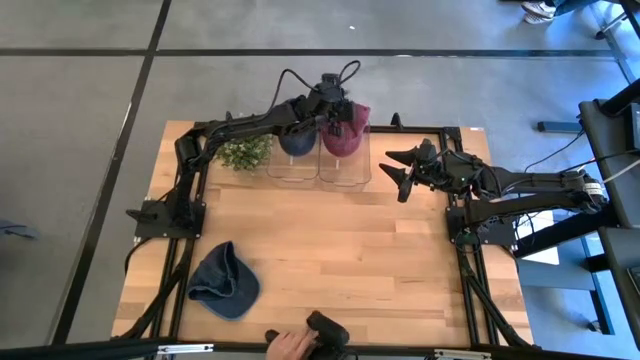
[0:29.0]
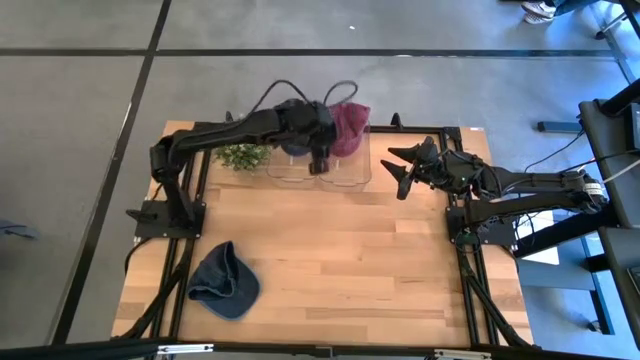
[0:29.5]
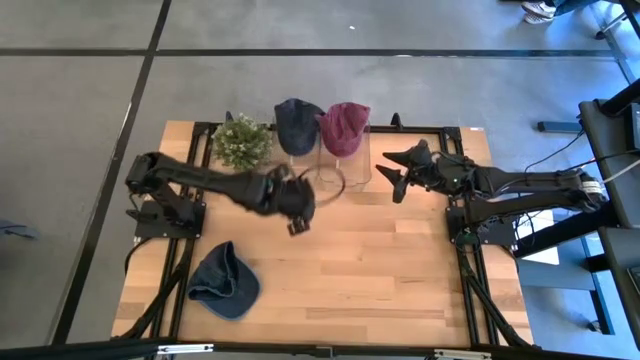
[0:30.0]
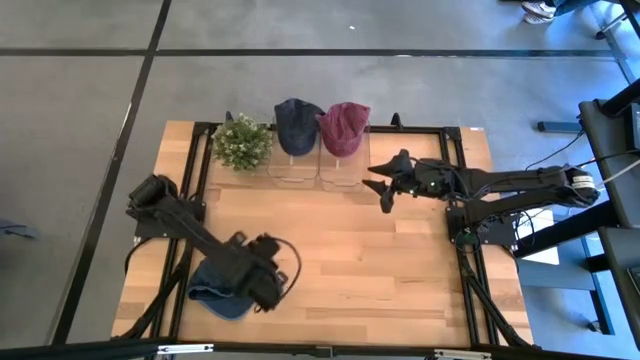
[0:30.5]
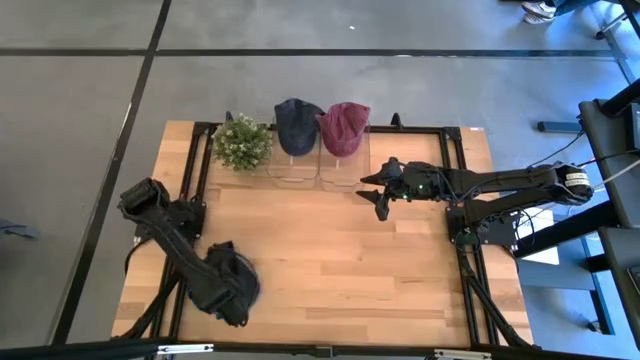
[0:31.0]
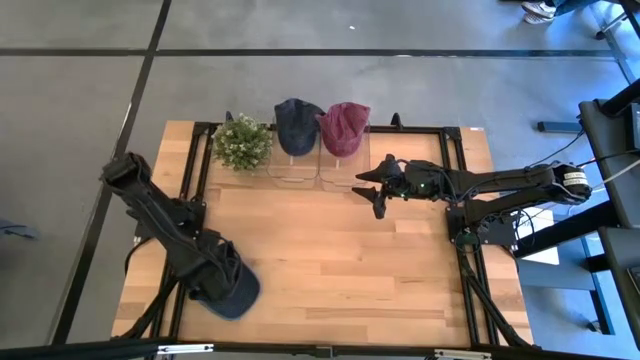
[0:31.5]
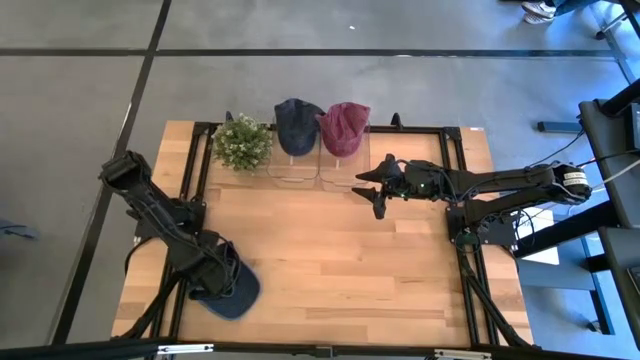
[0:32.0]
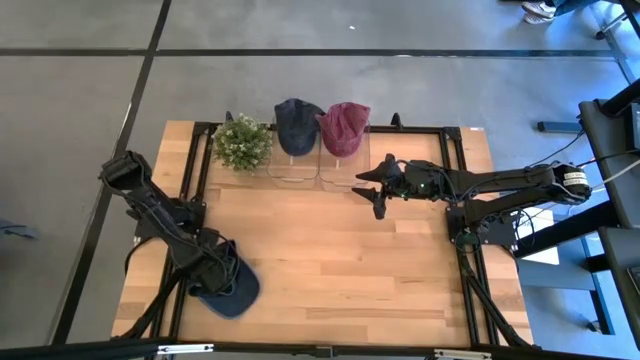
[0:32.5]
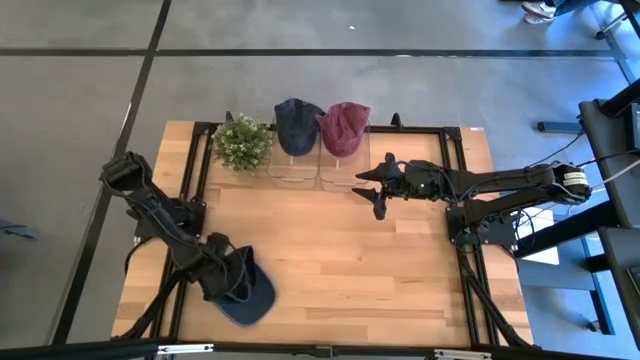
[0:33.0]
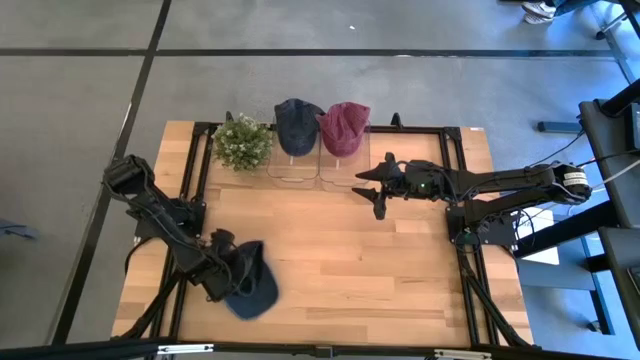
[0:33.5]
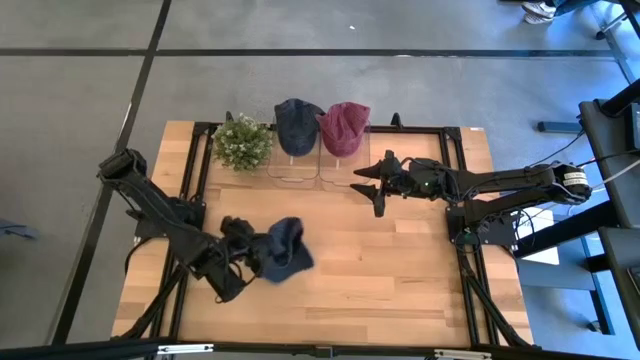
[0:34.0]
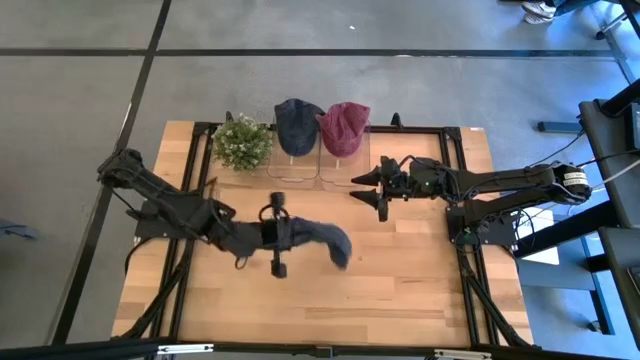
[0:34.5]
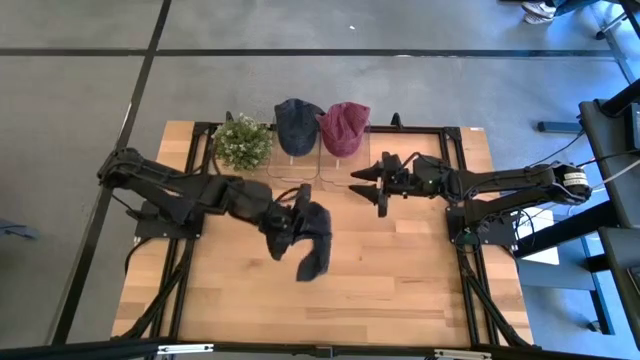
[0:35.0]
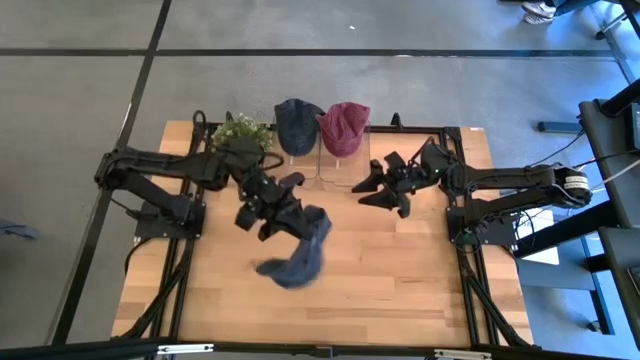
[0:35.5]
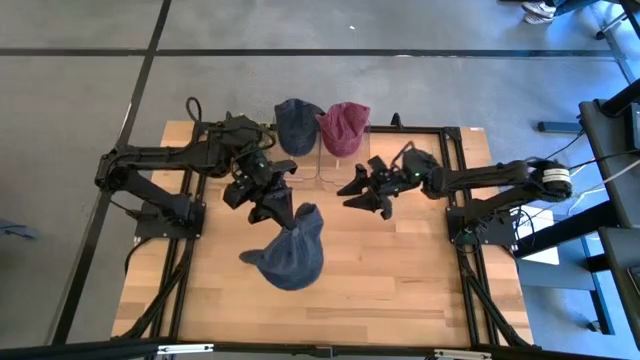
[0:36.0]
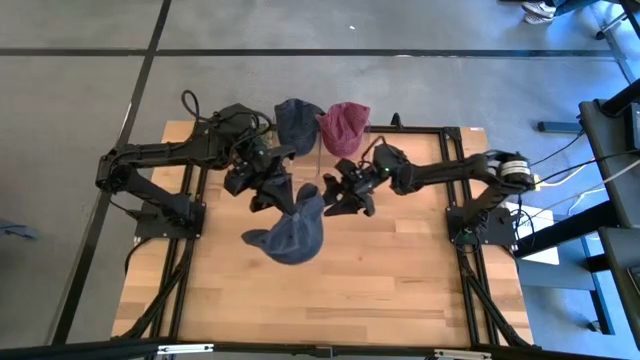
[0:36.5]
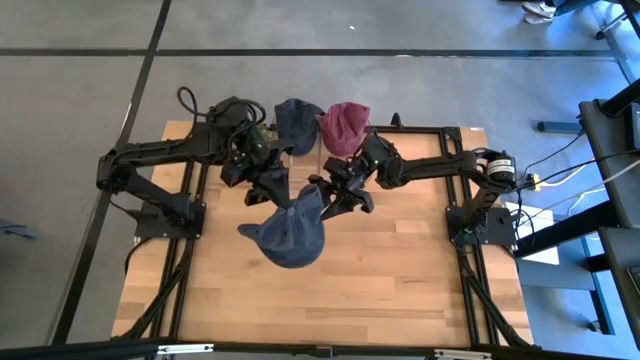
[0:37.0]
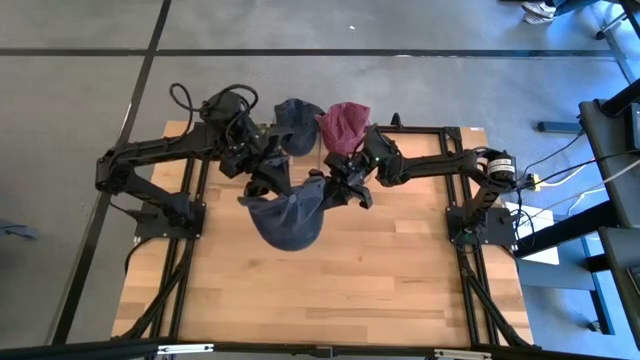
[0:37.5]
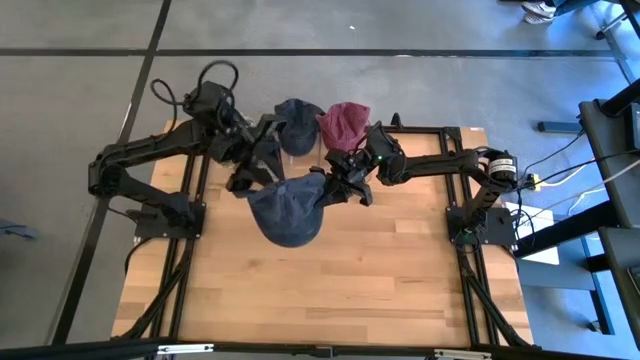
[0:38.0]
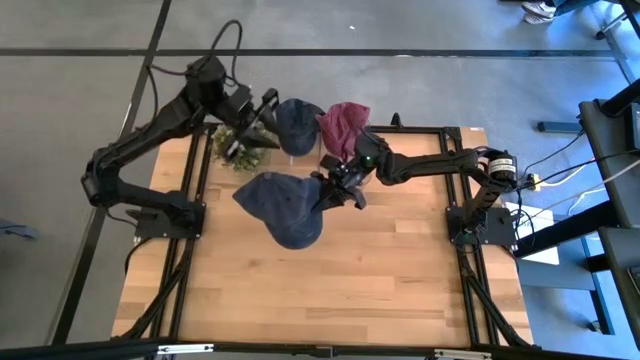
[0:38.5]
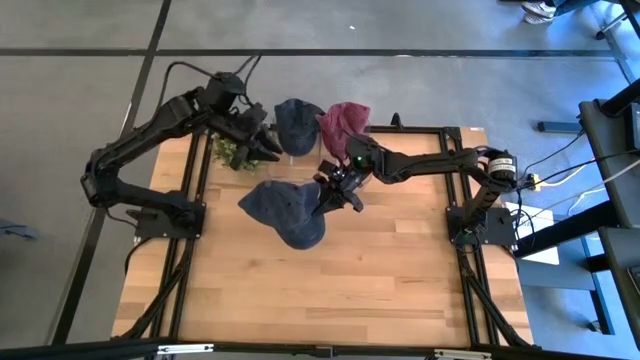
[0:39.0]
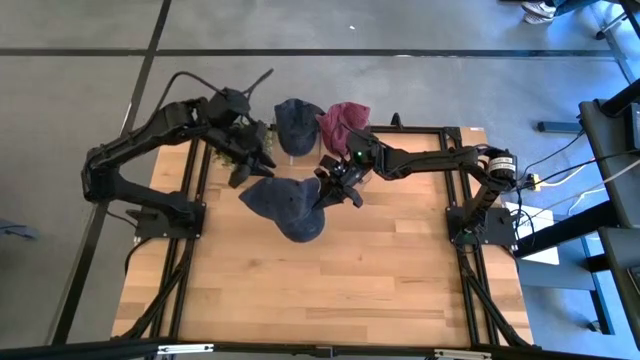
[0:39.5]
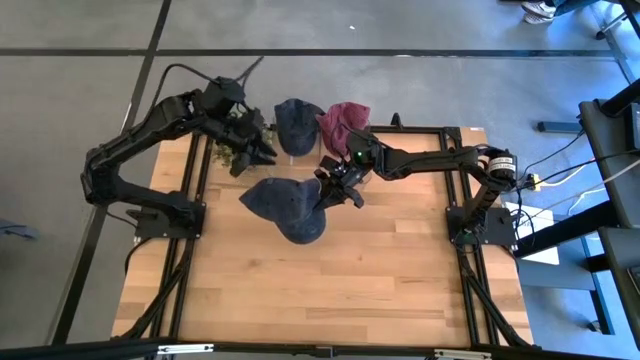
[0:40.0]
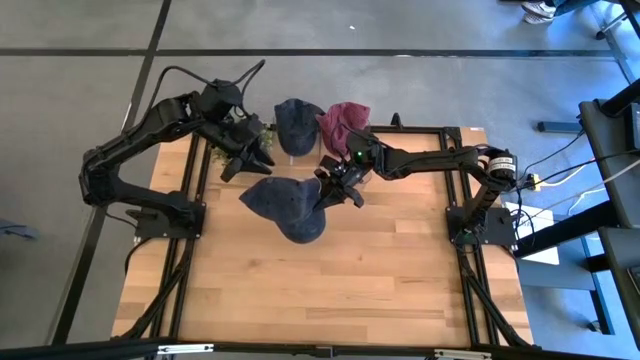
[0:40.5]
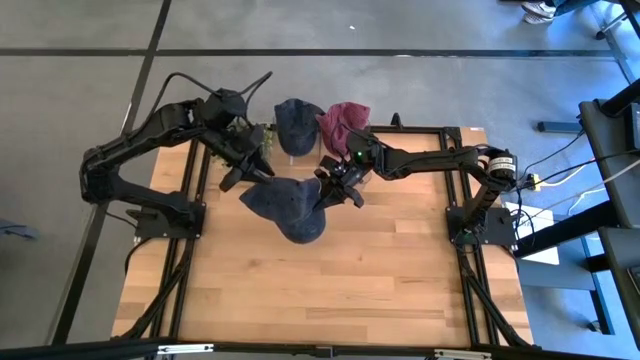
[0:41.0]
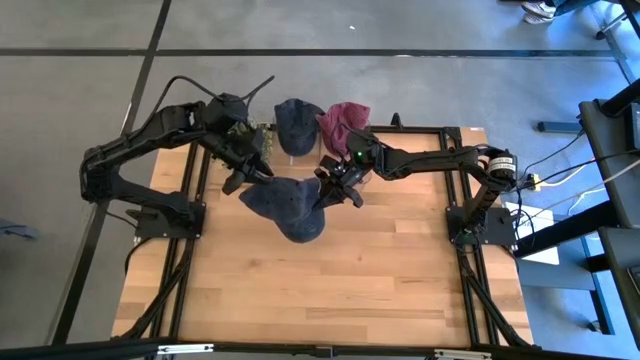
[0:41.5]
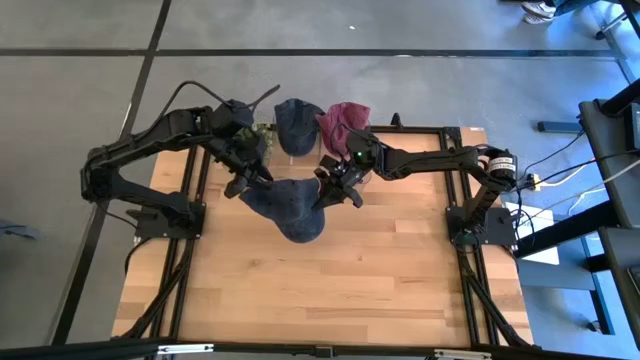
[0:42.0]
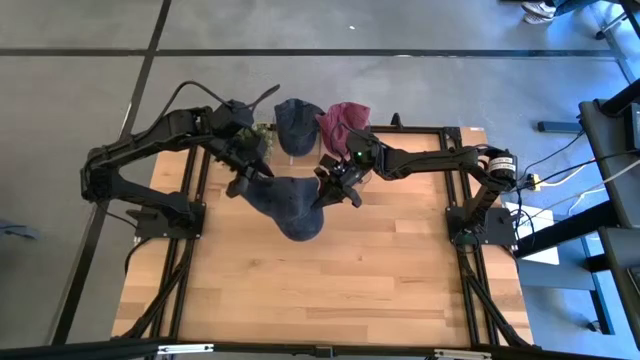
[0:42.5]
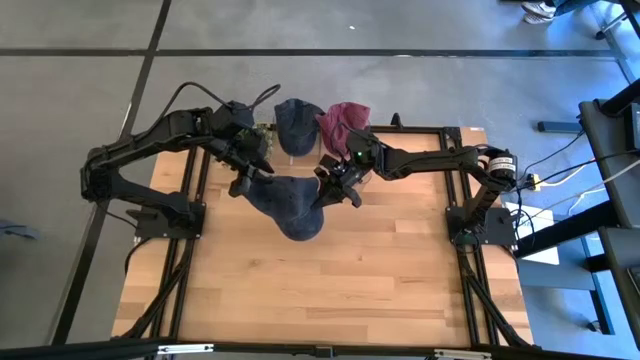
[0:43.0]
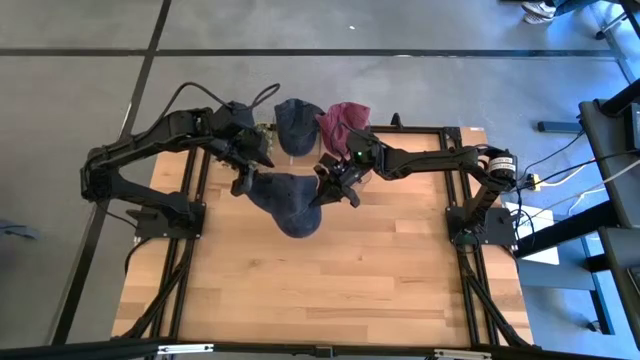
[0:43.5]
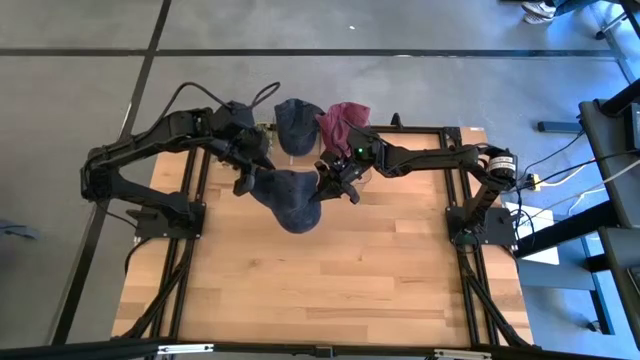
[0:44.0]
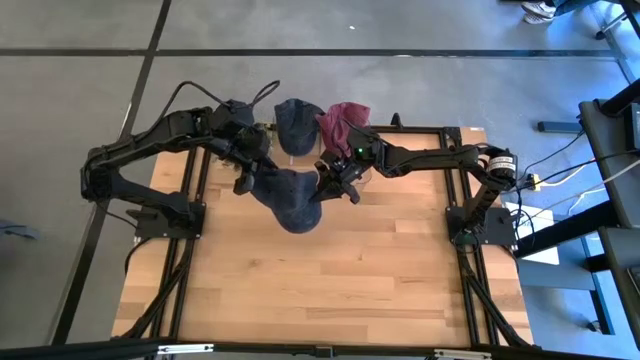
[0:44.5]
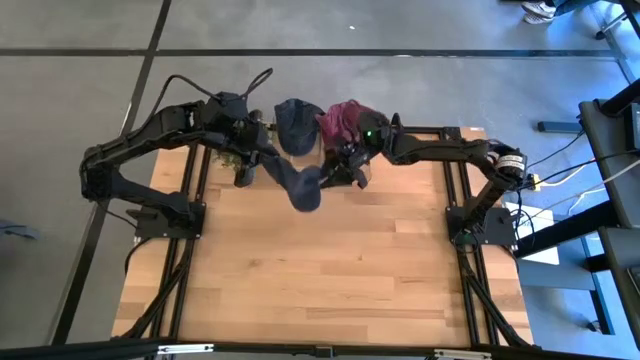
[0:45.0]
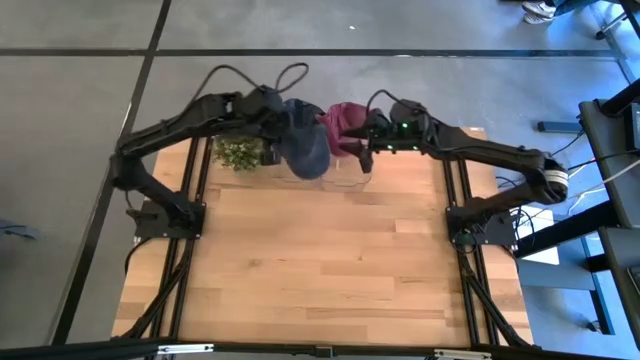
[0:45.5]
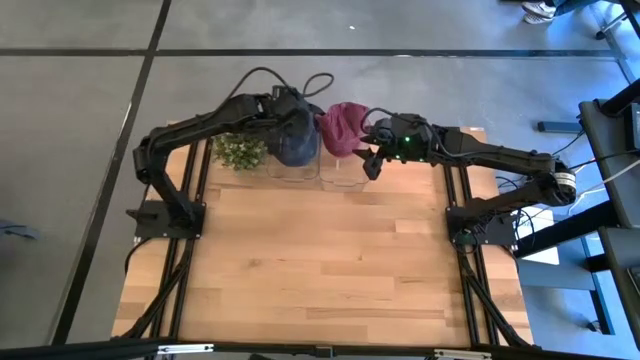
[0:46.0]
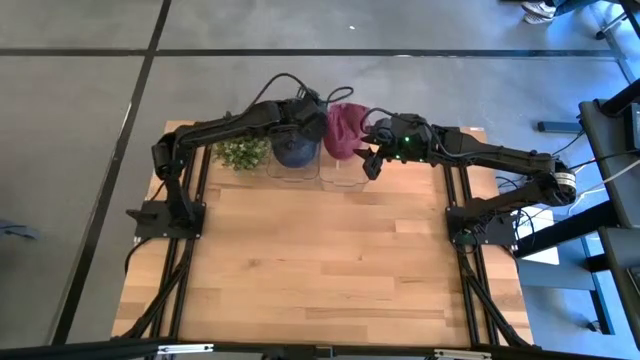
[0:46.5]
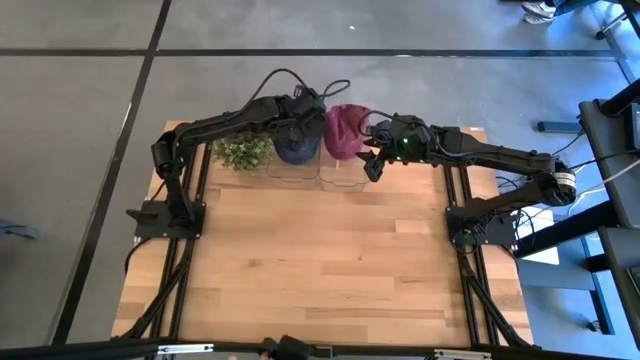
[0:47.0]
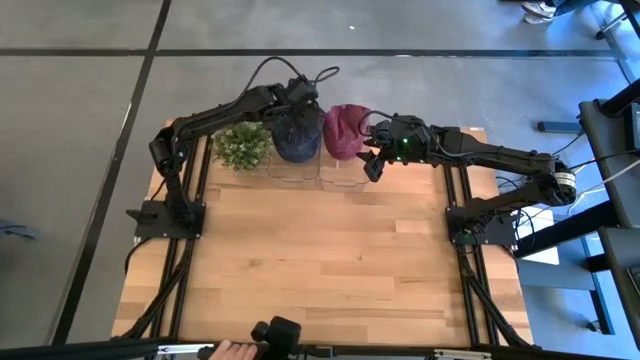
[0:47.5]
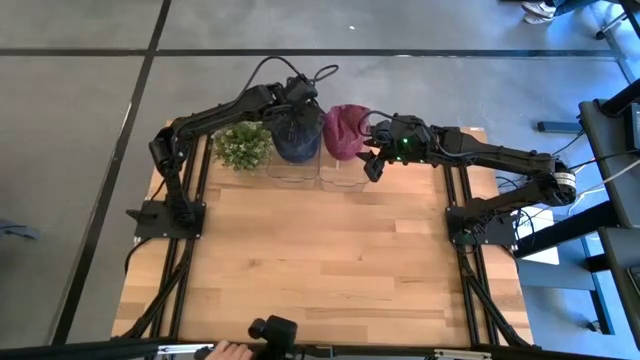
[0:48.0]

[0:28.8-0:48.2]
Task: Pick & Place hat
Put the black cap into the left transparent bin
